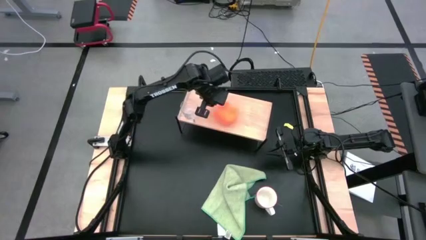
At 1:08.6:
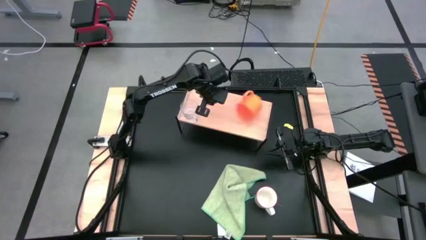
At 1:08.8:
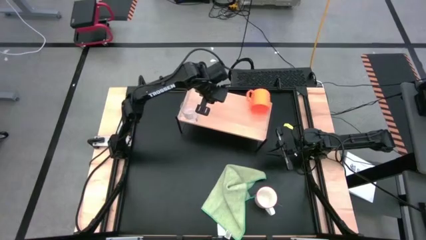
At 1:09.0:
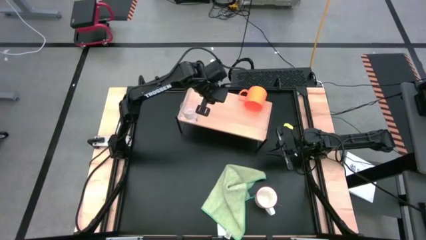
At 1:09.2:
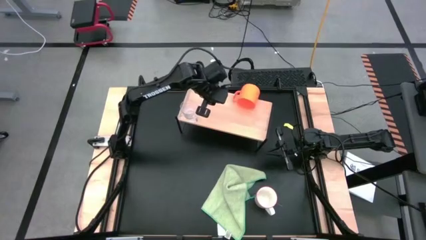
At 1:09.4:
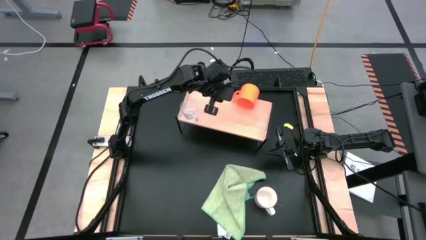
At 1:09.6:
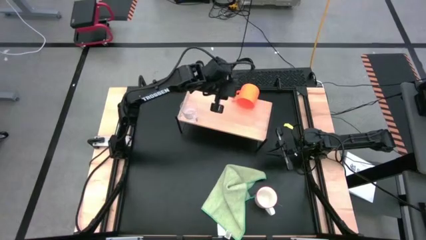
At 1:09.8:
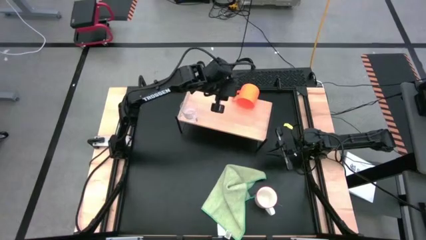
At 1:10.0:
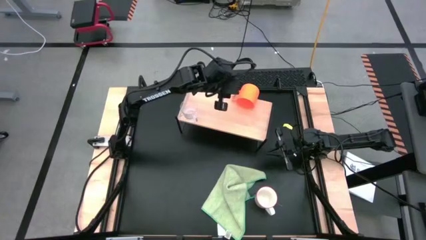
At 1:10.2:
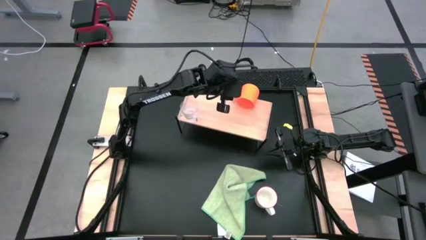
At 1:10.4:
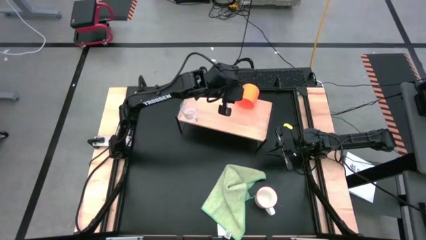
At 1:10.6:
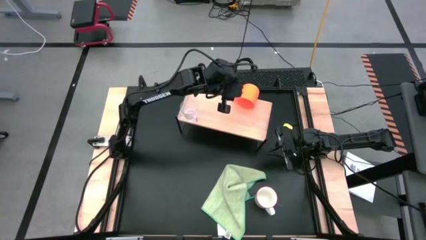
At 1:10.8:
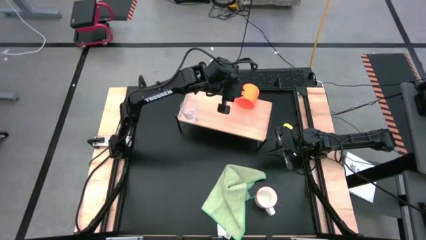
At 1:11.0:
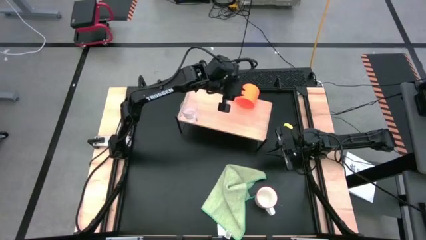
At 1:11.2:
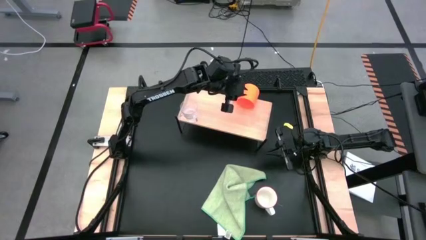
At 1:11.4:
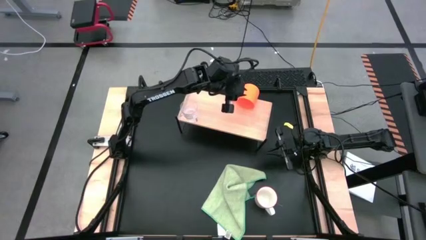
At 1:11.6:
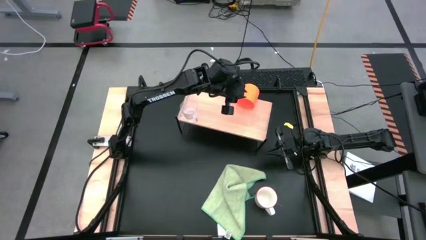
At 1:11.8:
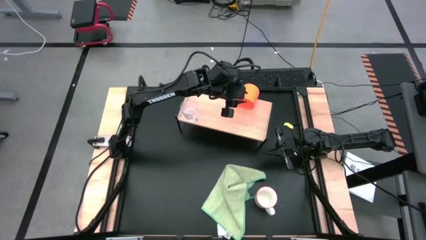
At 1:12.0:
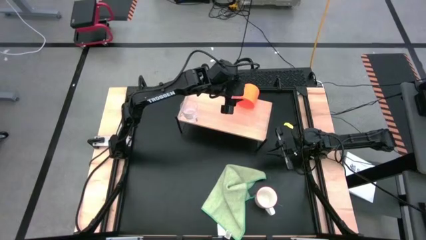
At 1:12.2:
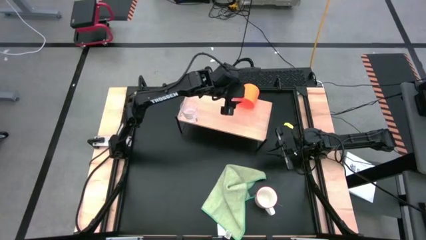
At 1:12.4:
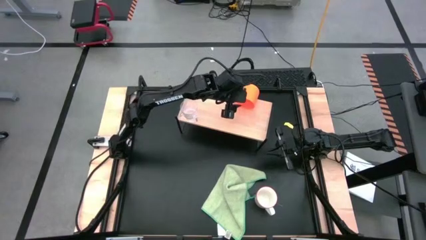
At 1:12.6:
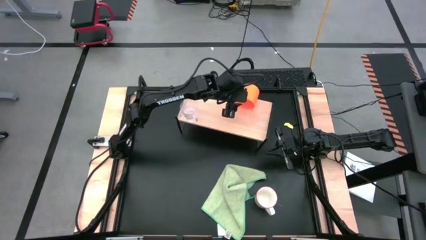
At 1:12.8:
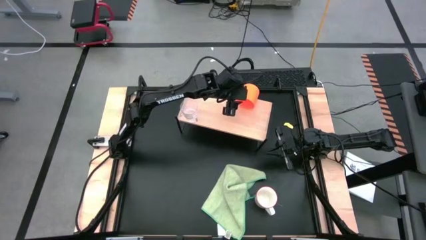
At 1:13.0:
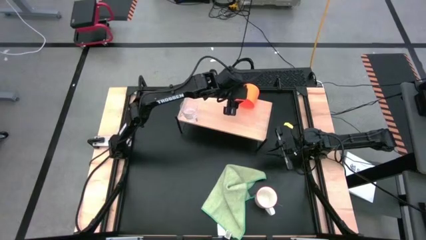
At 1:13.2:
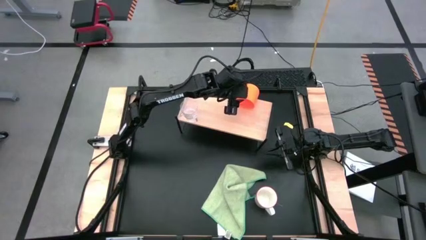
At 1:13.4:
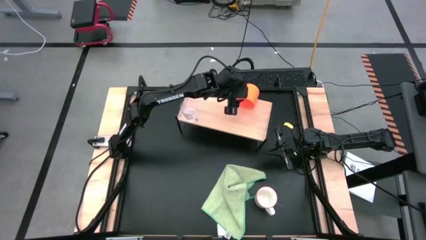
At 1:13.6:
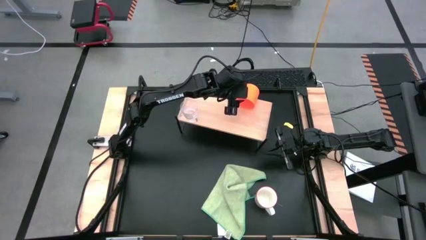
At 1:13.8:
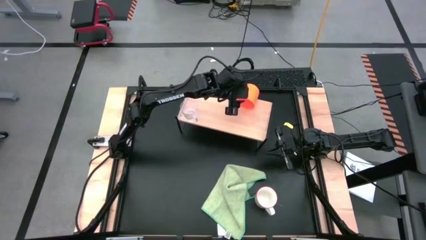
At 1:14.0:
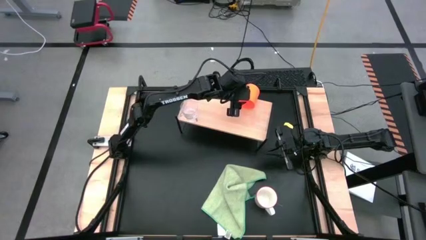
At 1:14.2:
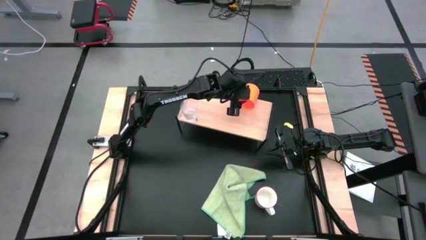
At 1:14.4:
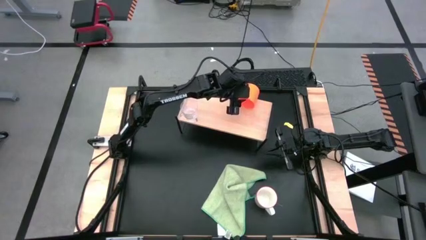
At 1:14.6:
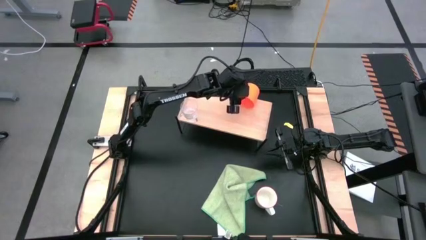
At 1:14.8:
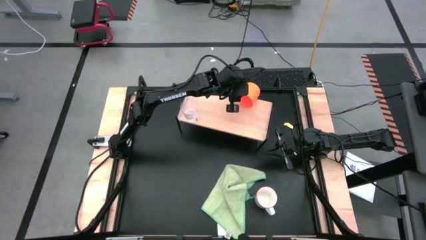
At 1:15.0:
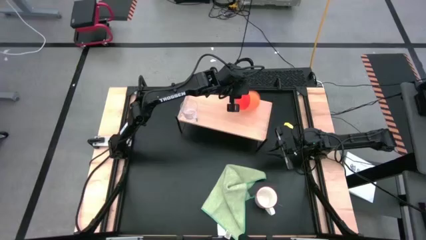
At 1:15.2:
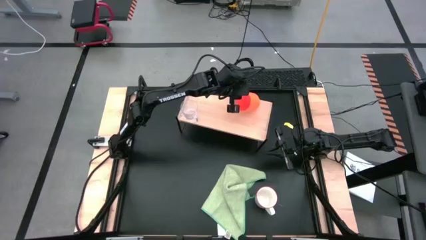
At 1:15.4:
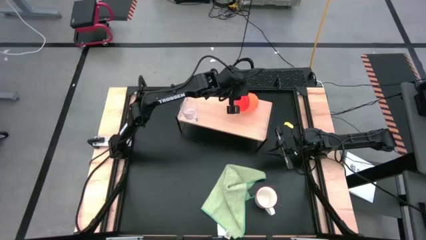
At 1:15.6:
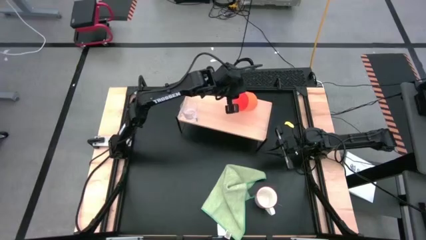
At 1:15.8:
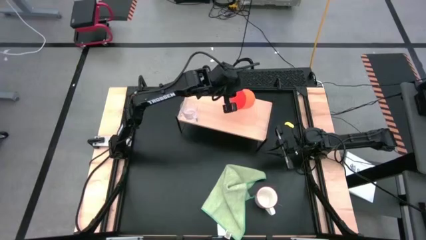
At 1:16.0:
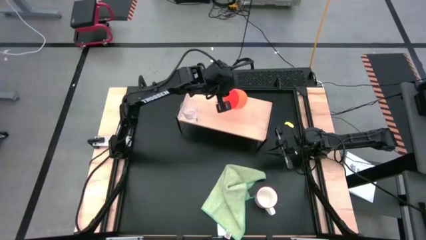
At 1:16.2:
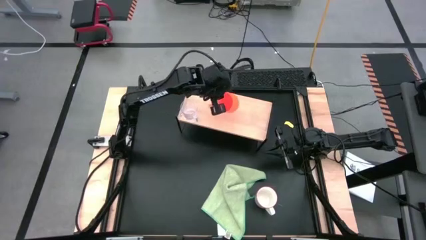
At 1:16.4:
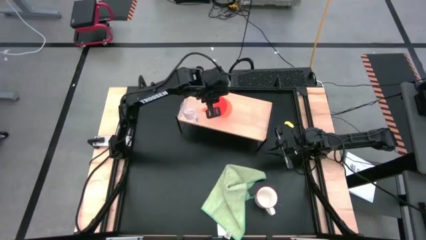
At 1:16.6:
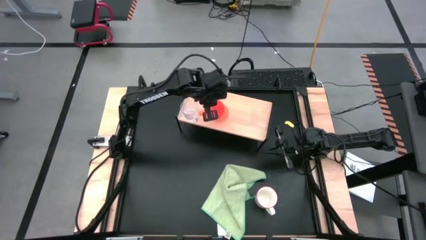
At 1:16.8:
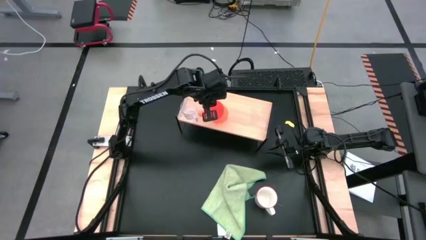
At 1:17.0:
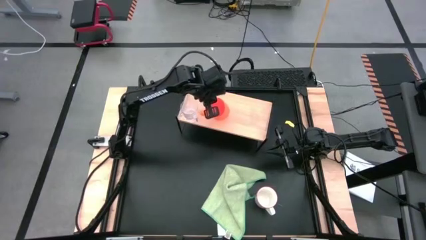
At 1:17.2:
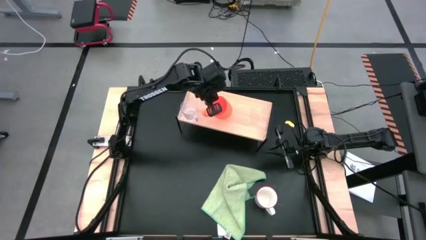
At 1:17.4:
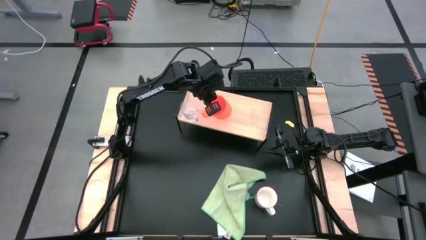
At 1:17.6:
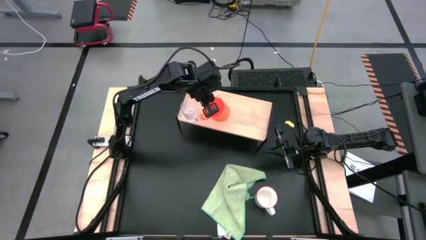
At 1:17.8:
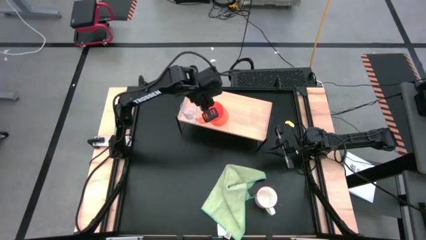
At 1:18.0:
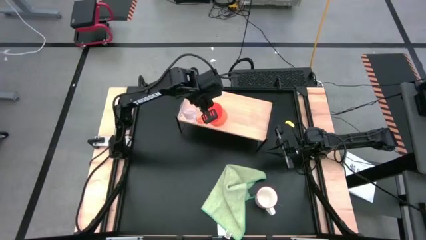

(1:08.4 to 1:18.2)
Task: Stack small to large cups/mugs on shelf
Put the orange mug on the shelf

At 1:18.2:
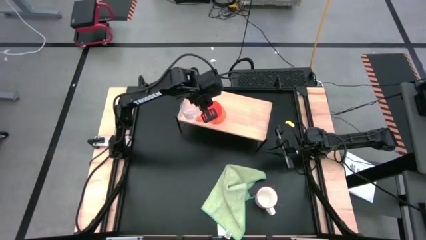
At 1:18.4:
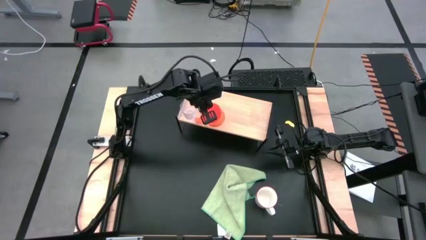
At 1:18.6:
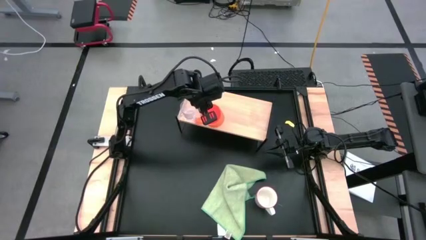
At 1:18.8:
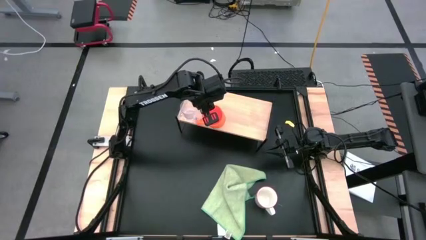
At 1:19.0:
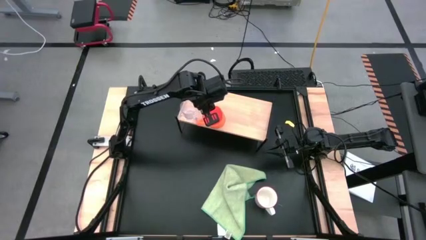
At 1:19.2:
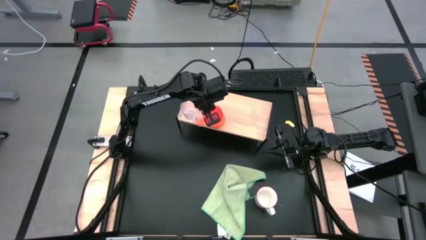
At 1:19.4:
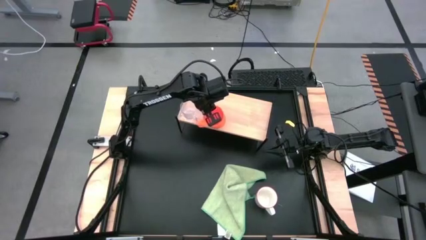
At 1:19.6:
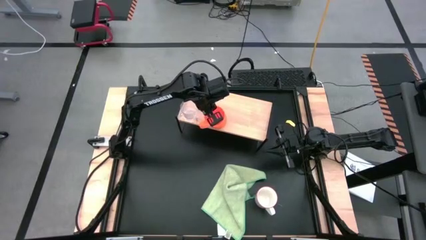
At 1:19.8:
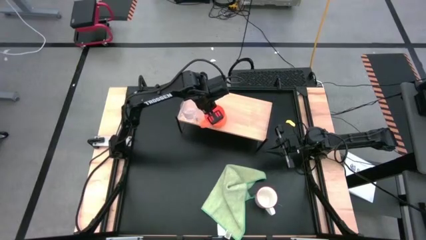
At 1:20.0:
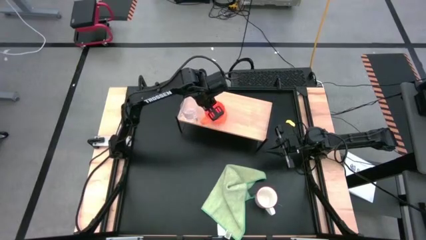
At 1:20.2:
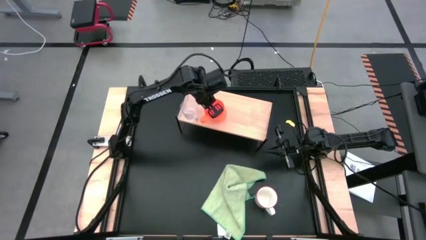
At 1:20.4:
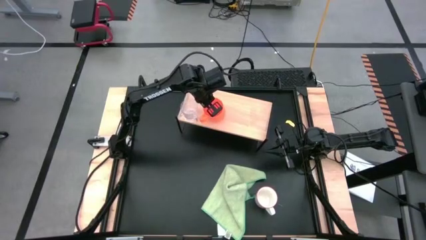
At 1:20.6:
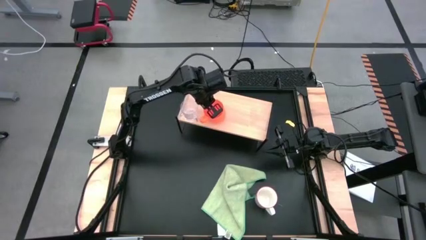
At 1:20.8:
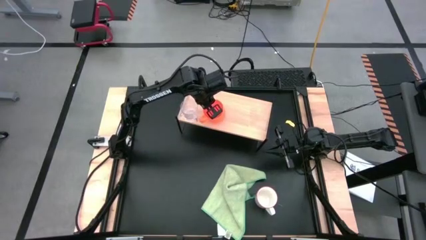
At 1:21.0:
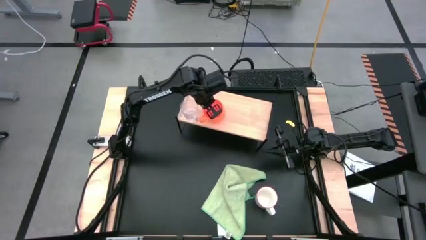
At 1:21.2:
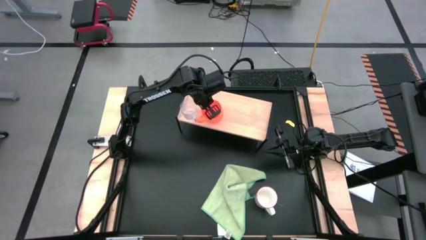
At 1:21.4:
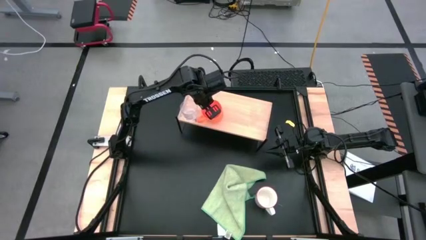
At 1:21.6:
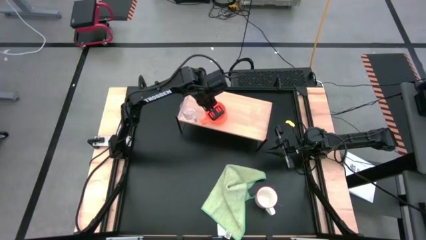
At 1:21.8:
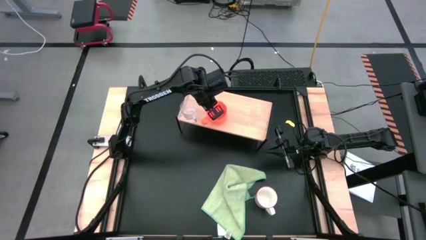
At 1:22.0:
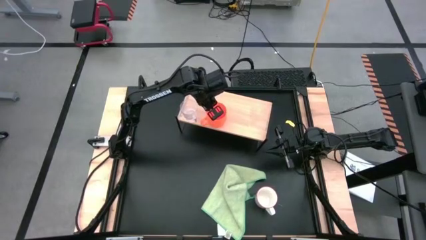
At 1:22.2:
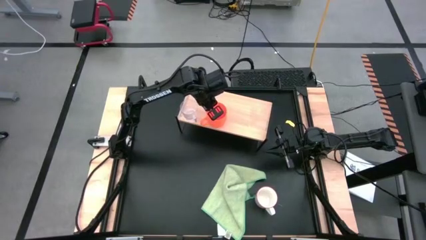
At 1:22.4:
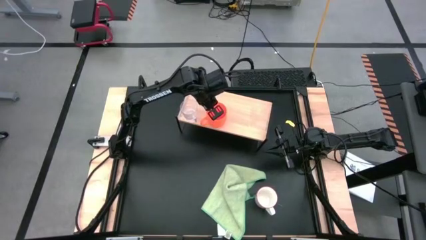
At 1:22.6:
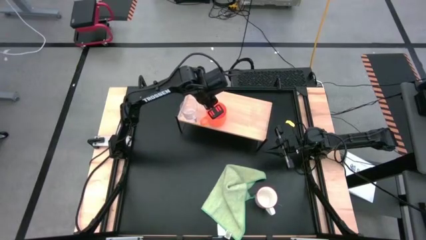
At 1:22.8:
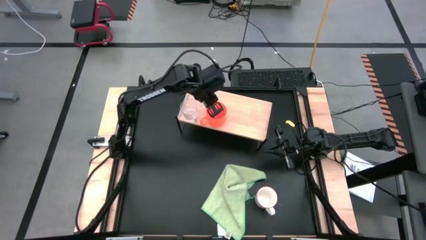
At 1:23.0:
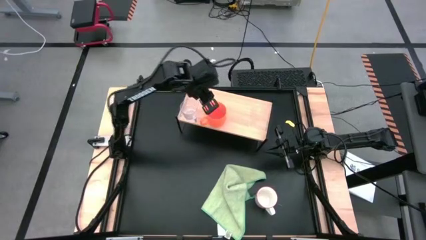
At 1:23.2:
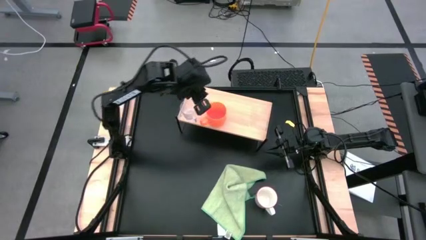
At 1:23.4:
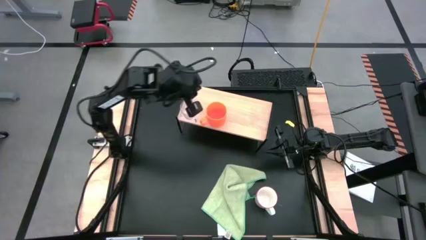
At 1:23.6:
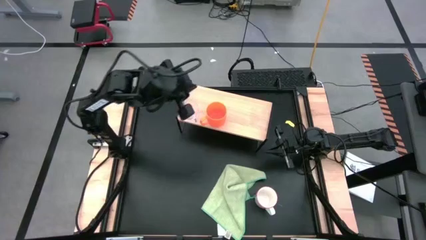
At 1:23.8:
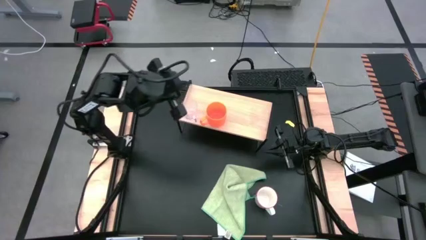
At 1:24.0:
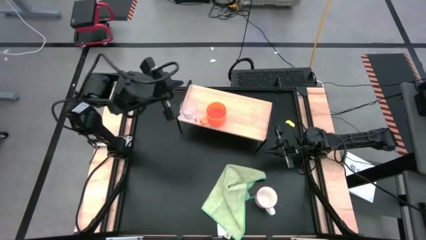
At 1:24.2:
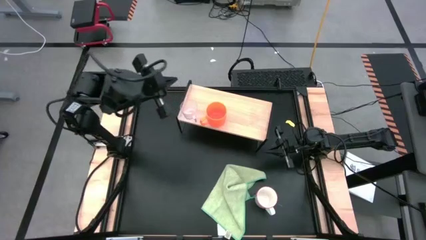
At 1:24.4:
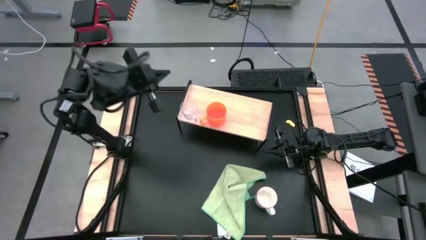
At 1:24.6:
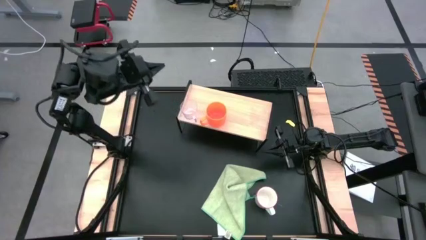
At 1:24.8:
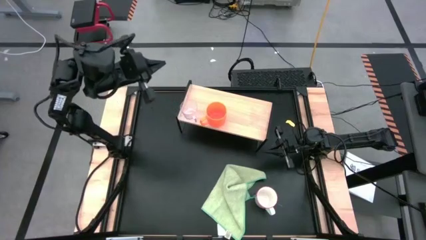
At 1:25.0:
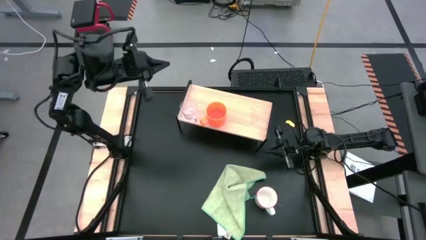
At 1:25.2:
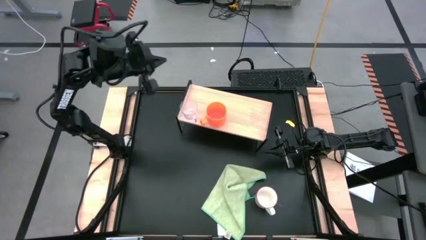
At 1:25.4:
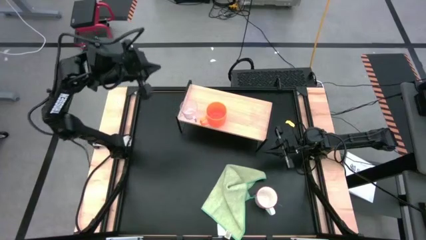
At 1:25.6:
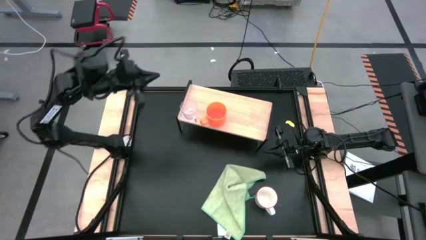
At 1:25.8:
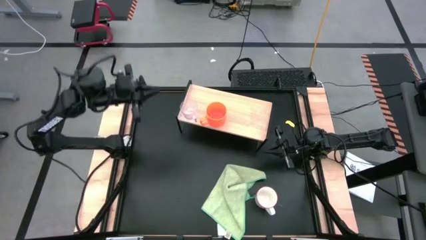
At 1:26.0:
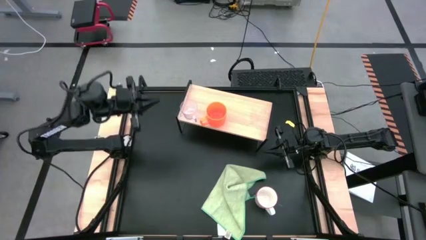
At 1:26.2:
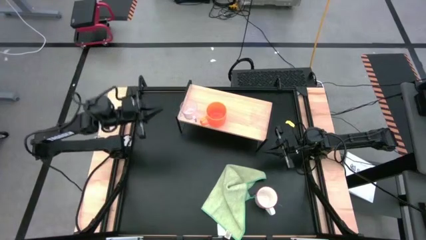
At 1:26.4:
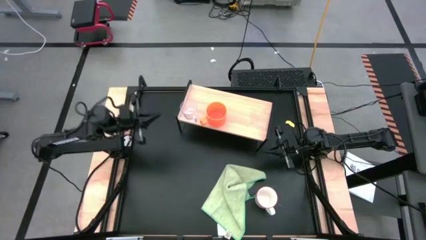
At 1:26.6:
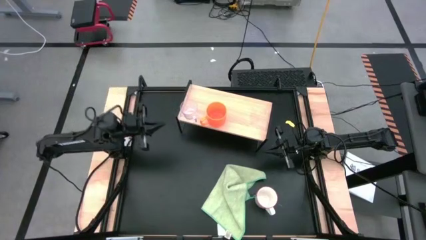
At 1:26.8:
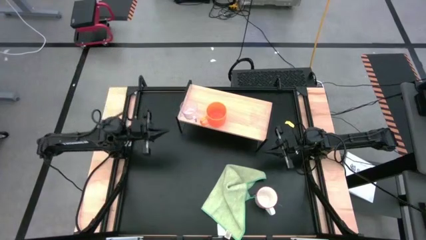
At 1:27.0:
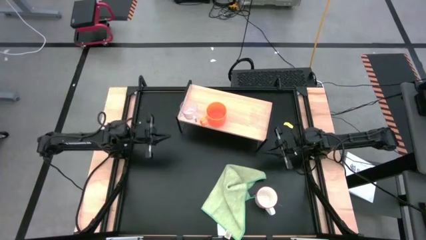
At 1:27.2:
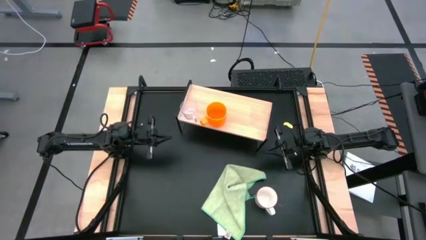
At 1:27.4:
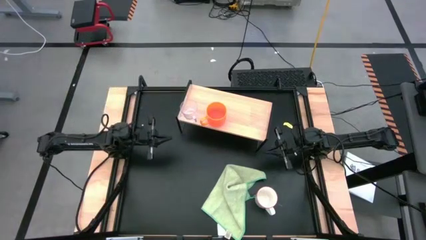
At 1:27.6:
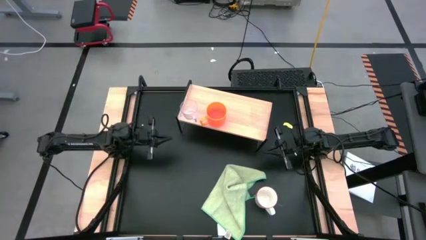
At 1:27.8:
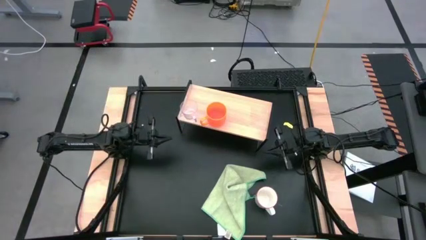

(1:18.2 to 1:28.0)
Put the orange mug on the shelf
